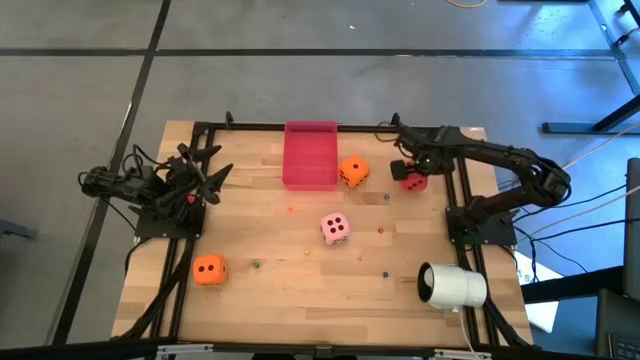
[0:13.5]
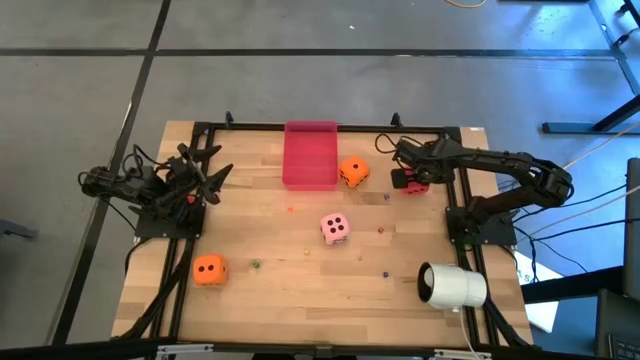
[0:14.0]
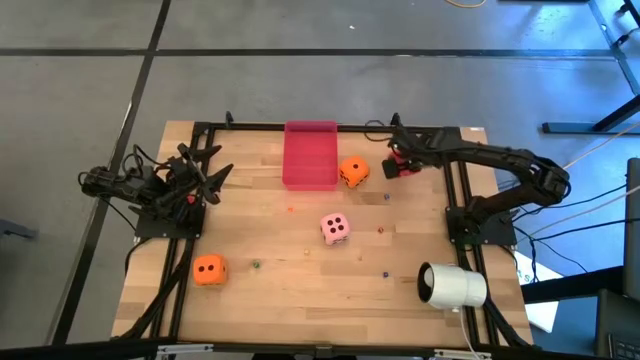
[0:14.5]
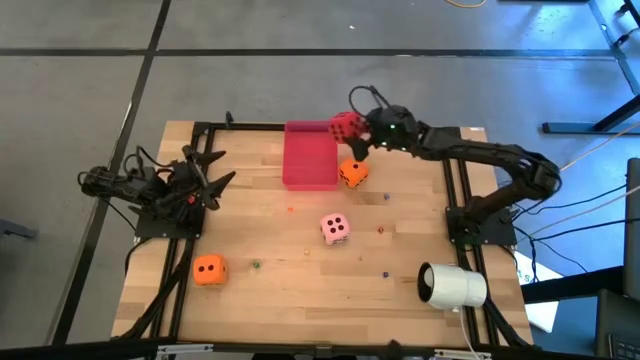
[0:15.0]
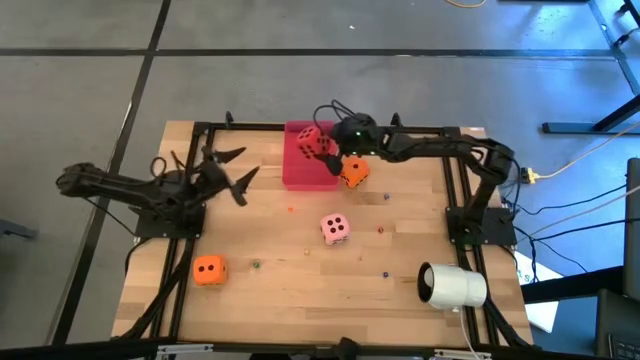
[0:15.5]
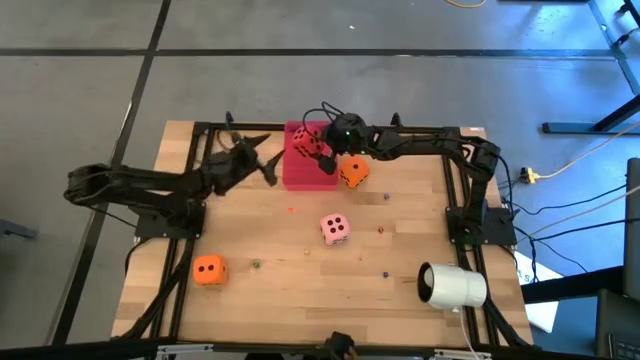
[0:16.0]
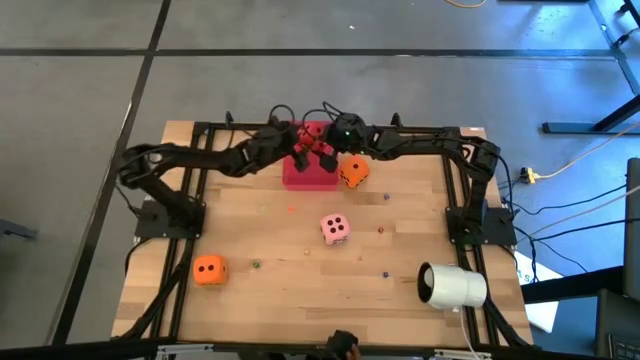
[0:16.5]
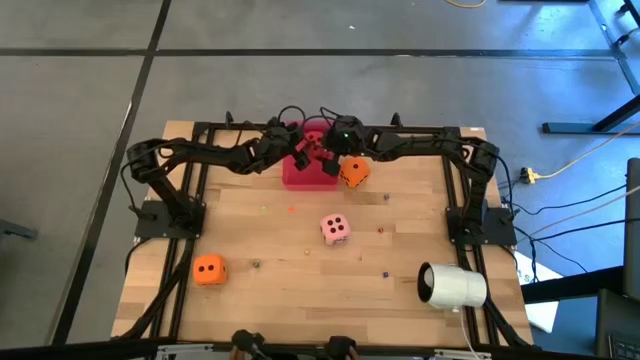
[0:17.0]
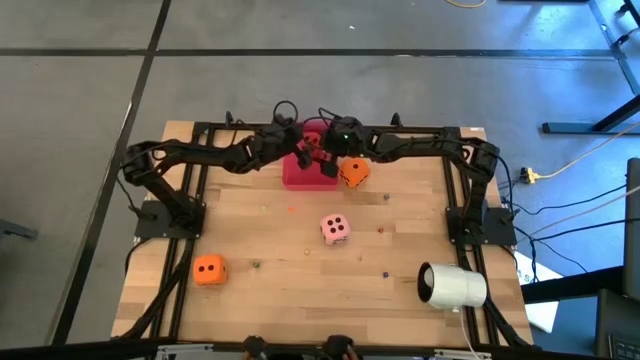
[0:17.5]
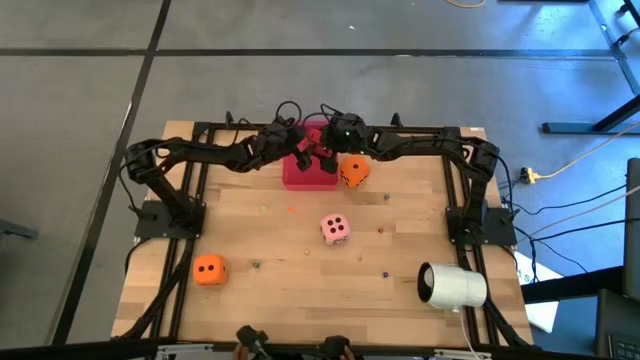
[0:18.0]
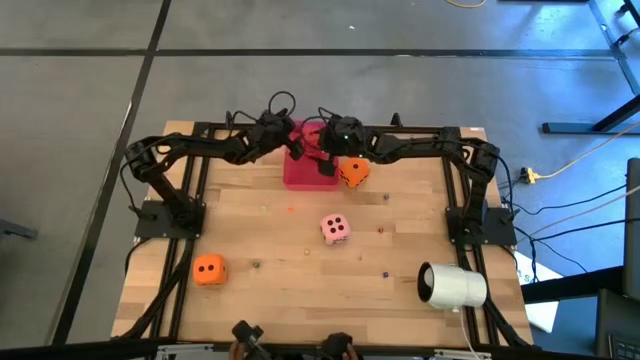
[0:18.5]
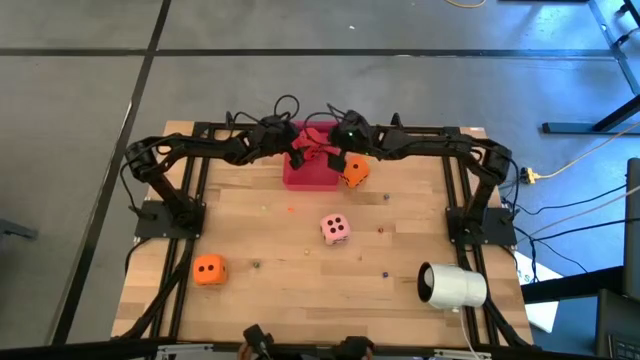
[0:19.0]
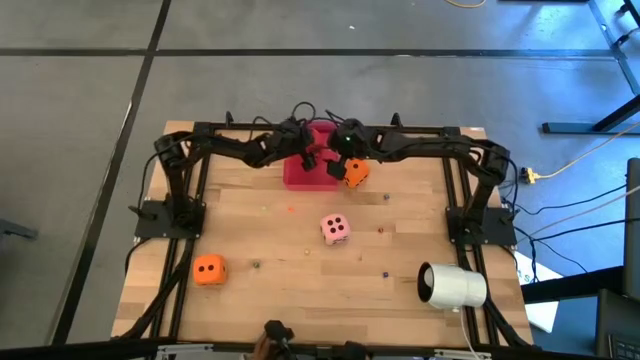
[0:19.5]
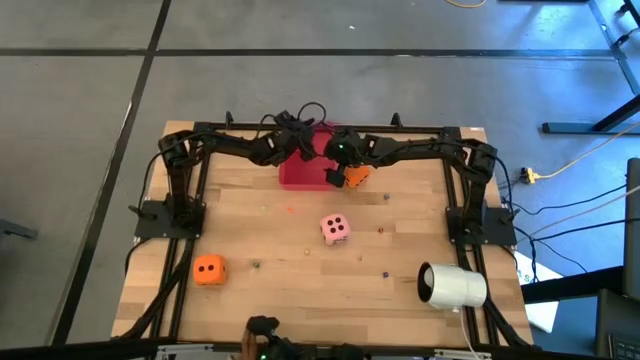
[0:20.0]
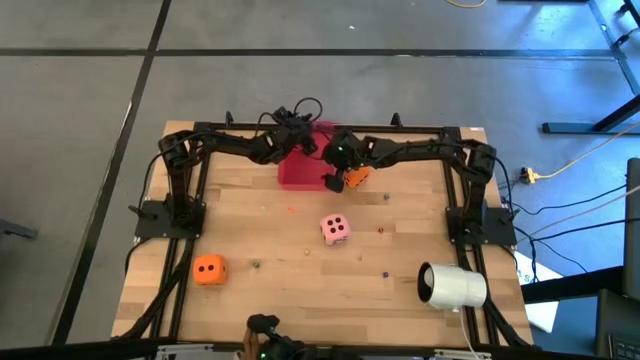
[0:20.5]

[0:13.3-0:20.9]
Task: Pick & Place Dice
Put the large red dice into the bin

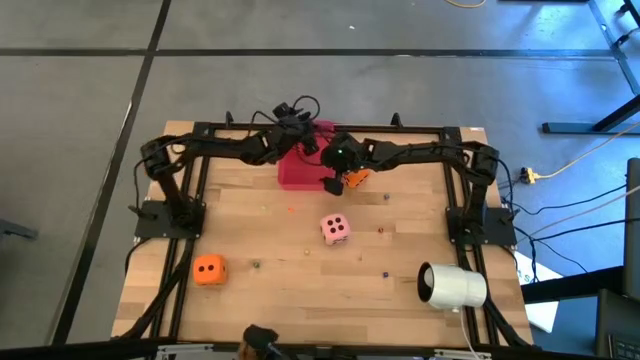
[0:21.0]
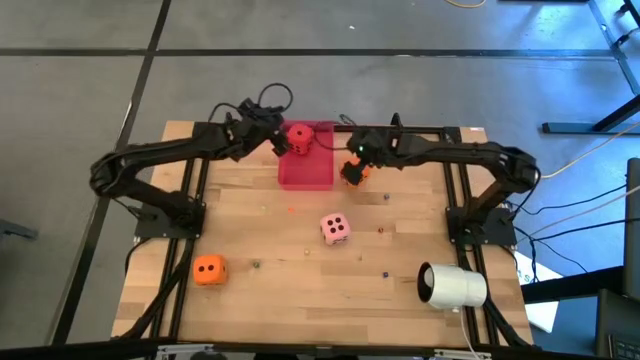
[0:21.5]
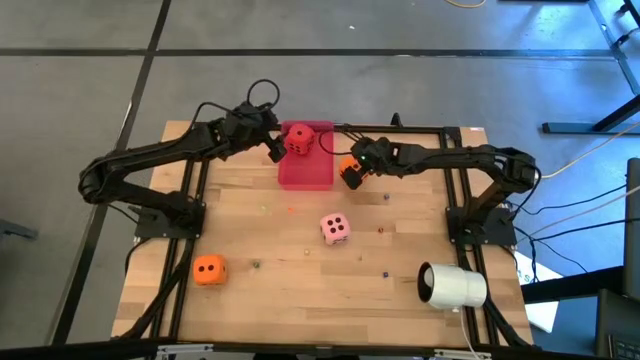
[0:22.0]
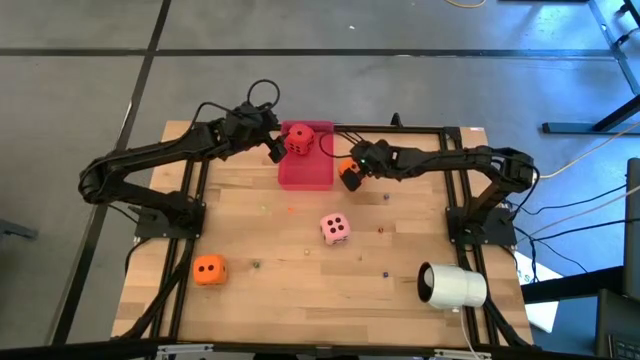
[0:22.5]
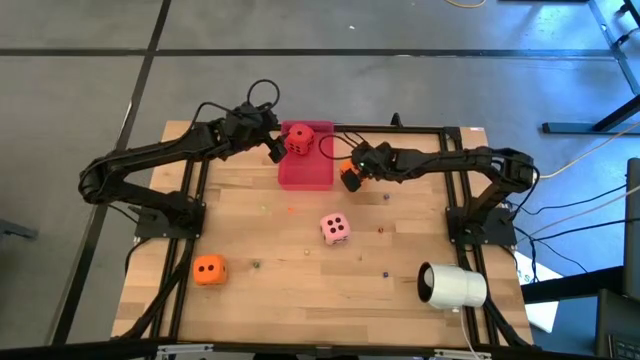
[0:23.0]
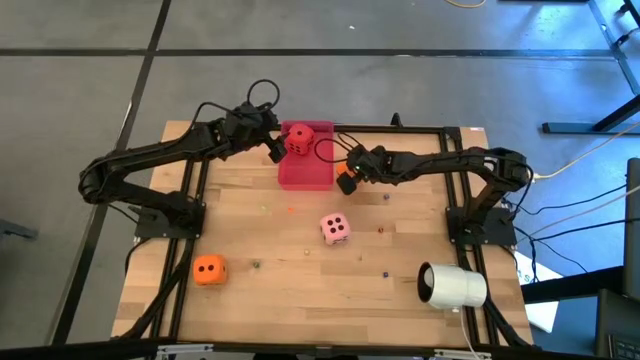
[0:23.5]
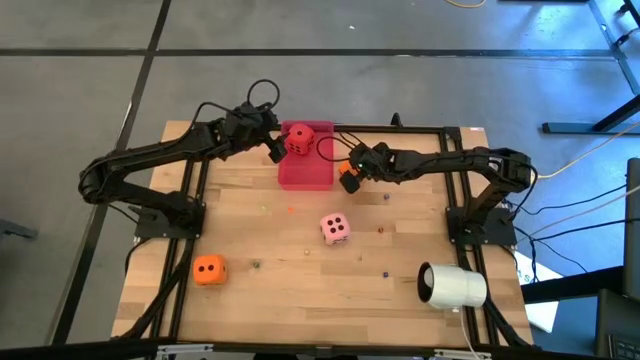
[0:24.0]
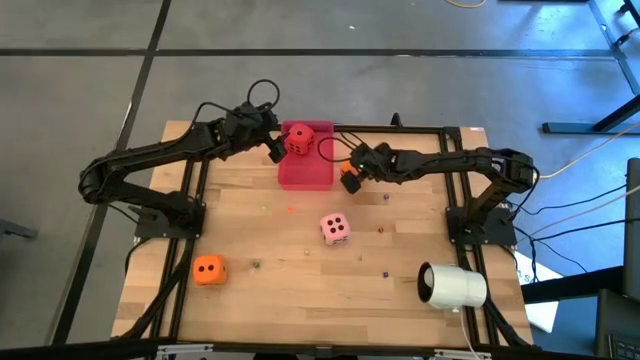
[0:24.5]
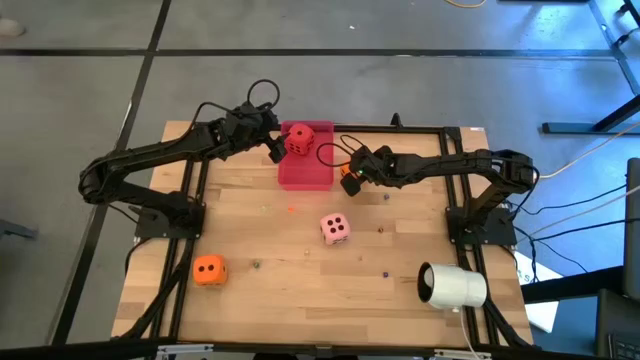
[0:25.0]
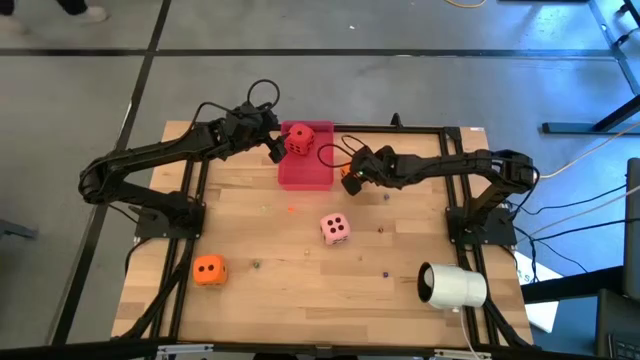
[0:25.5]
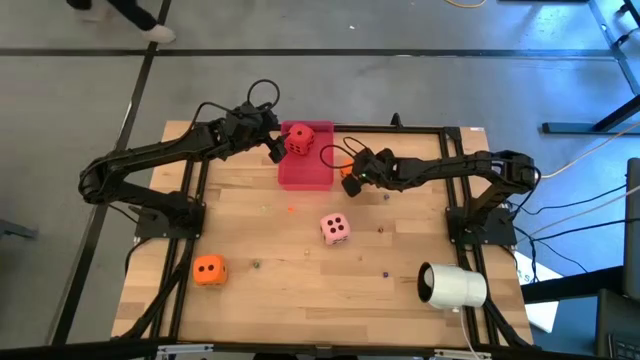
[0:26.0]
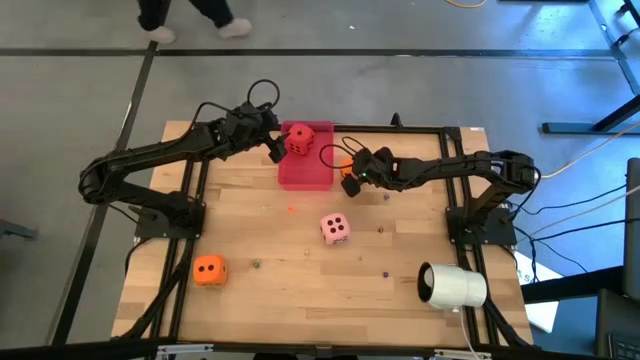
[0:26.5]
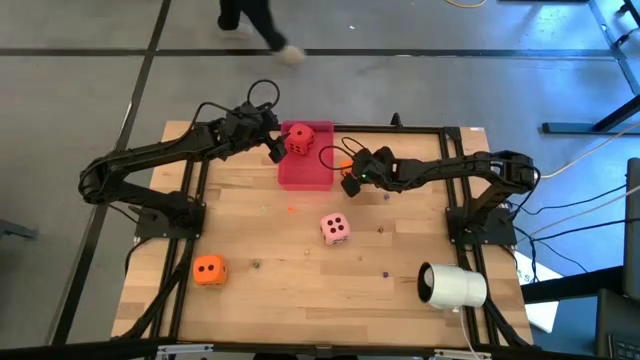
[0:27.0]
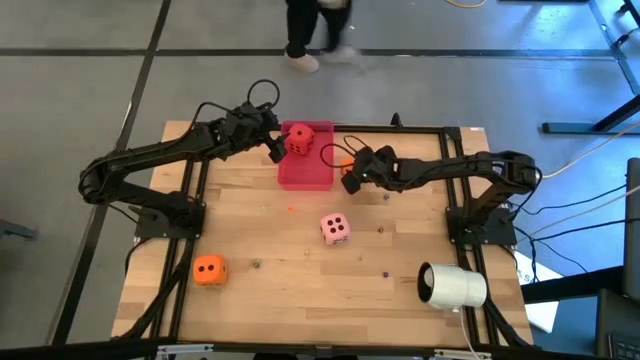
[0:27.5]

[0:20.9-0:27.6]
Put the top large orange dice into the bin

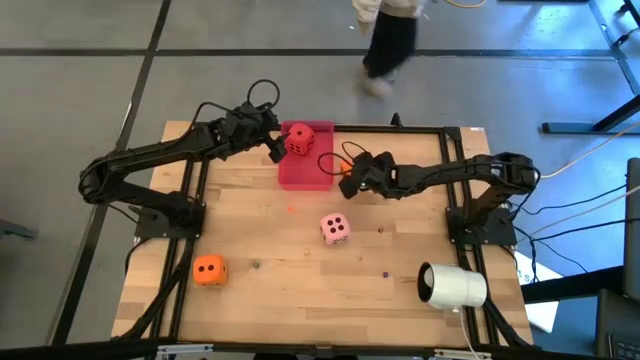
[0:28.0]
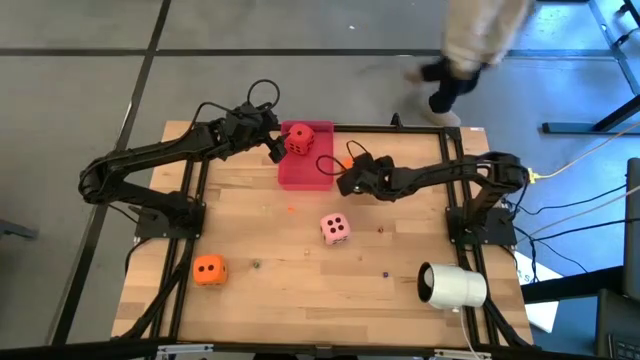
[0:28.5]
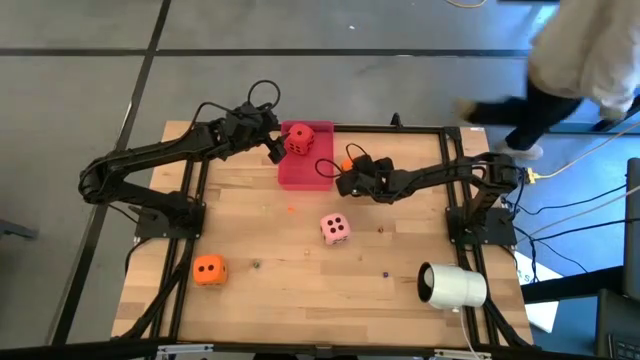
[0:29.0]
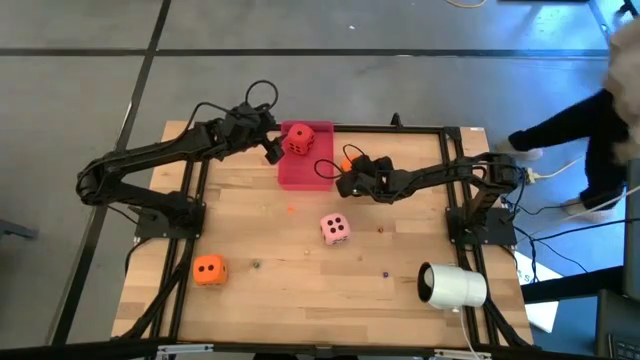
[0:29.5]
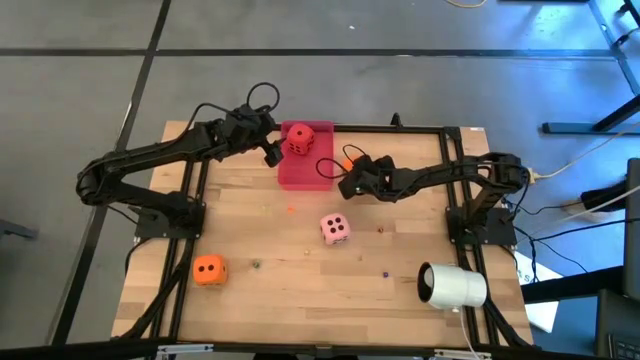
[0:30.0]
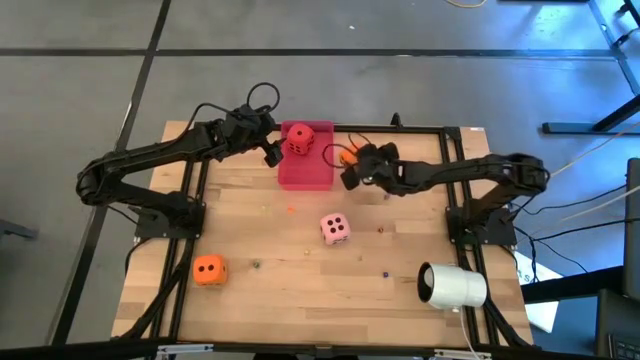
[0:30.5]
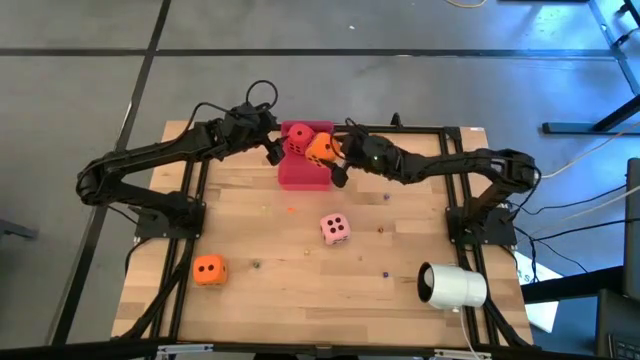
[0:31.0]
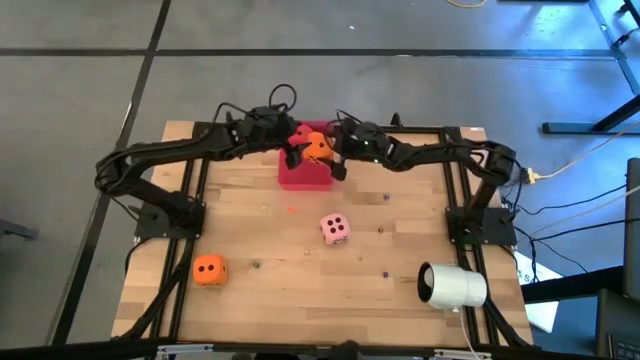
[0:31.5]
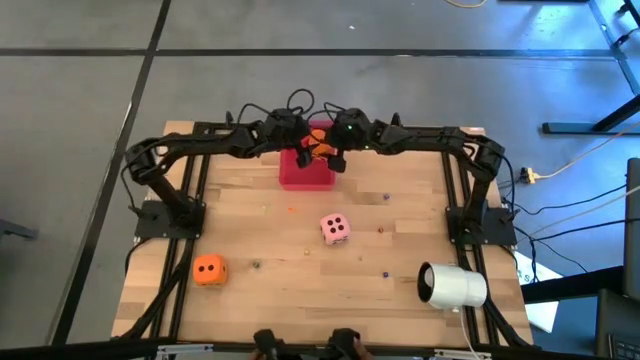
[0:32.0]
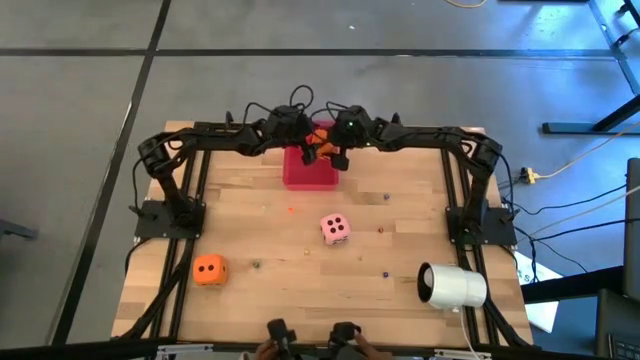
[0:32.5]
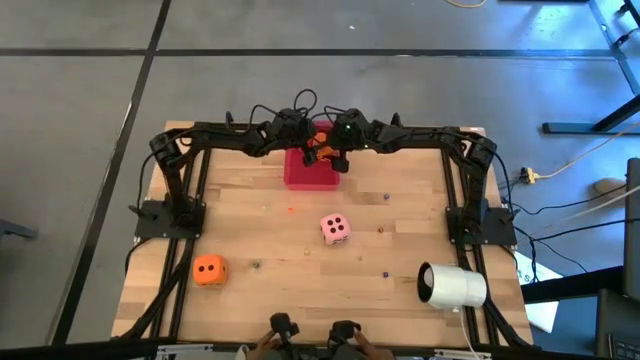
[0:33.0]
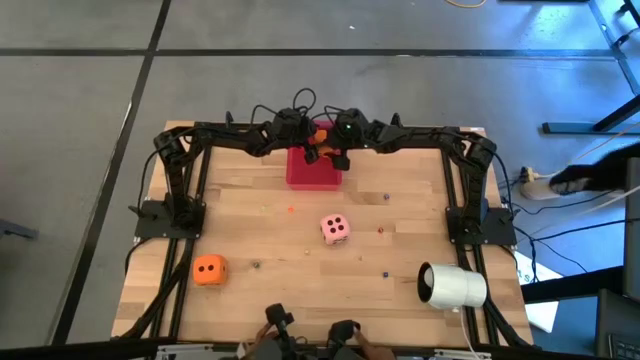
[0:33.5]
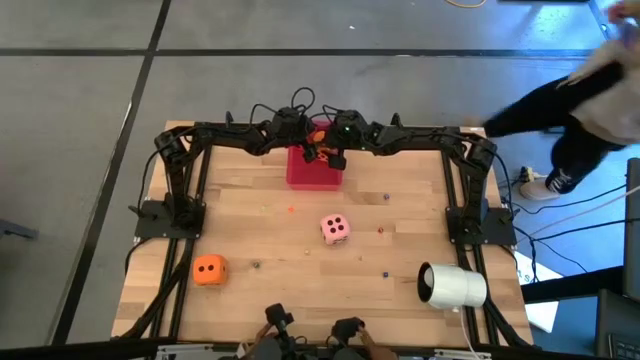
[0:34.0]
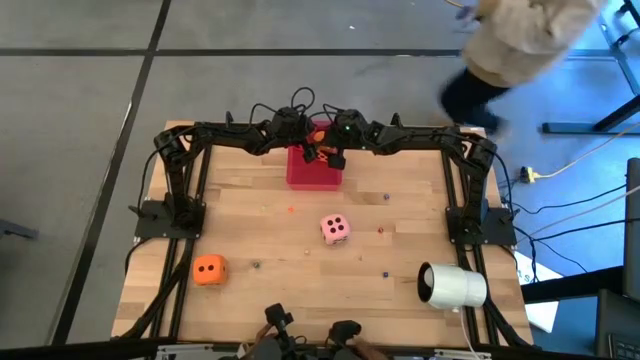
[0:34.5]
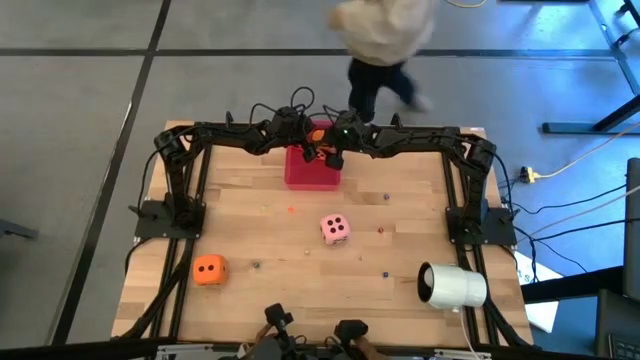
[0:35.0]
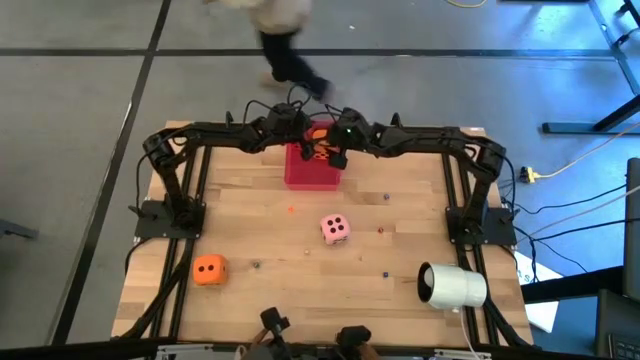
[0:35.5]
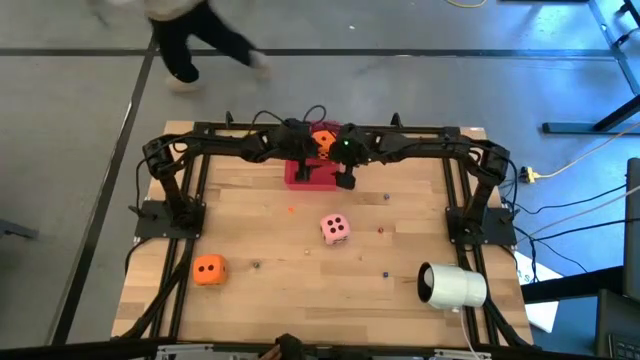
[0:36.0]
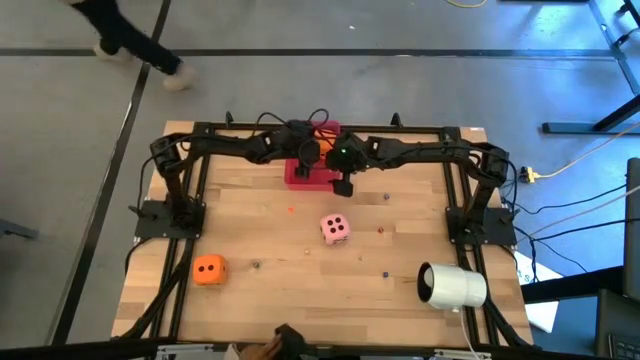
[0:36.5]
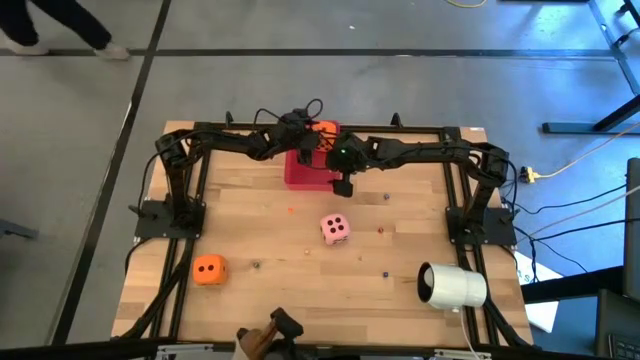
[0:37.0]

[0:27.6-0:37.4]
Put the top large orange dice into the bin
